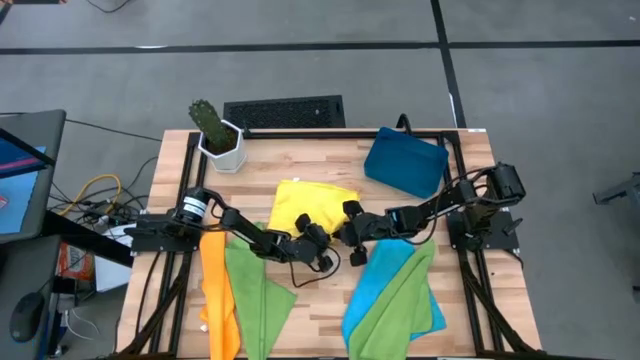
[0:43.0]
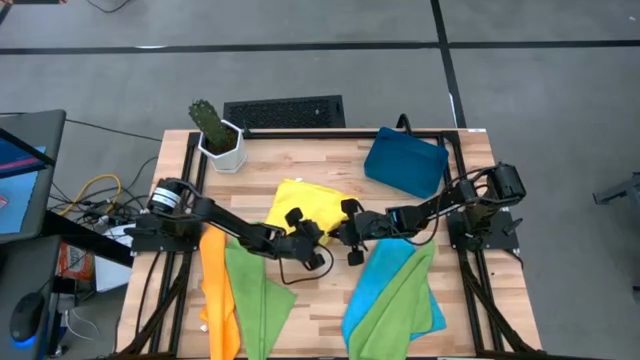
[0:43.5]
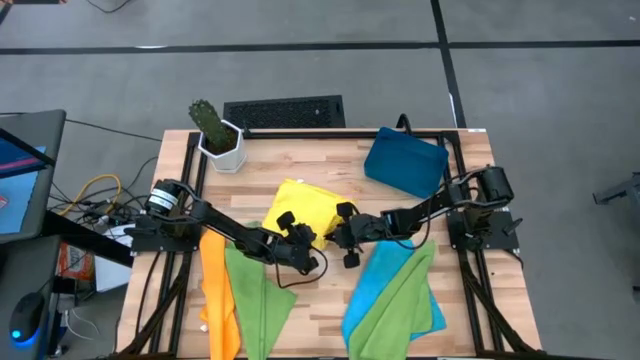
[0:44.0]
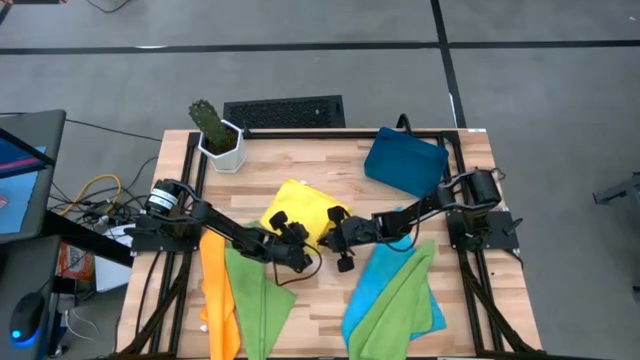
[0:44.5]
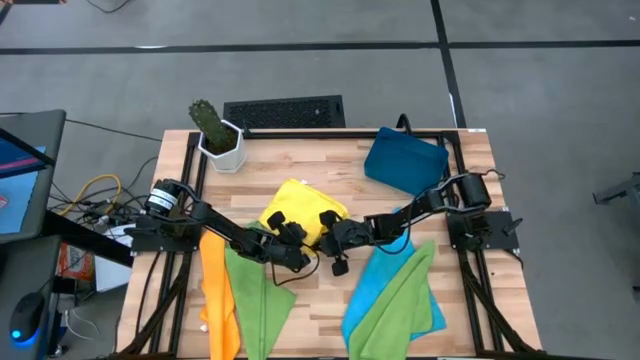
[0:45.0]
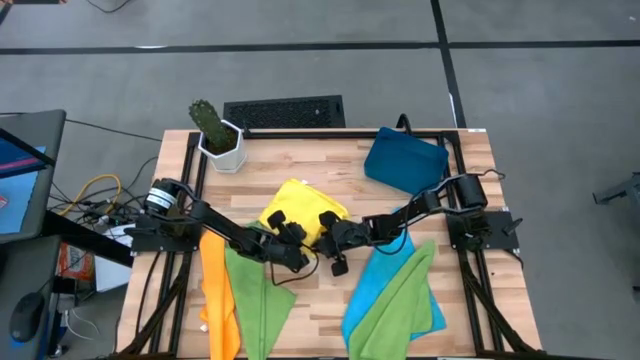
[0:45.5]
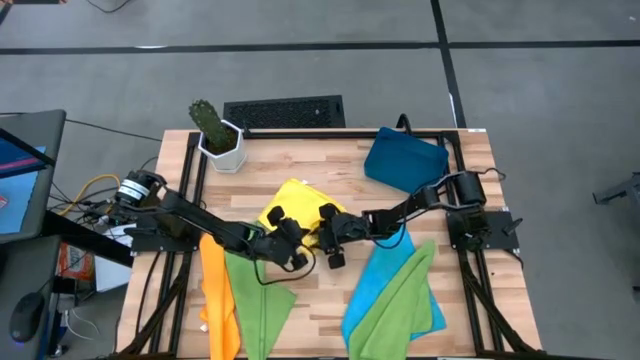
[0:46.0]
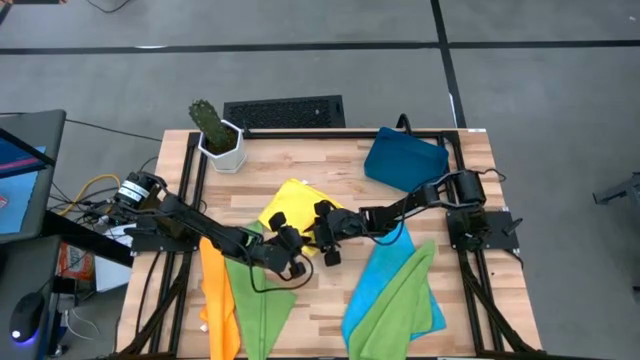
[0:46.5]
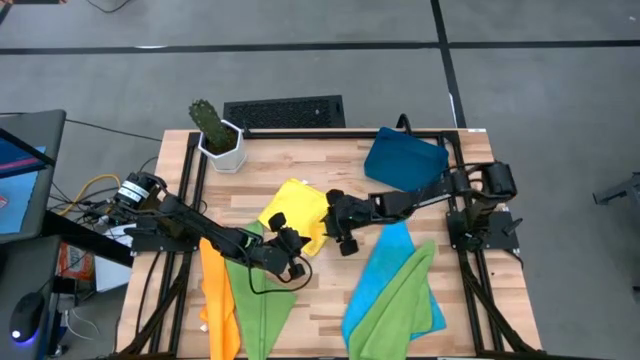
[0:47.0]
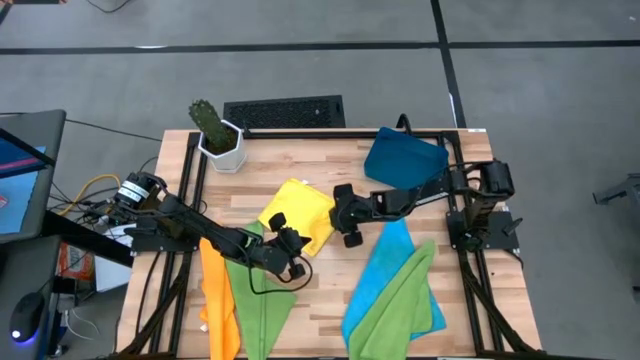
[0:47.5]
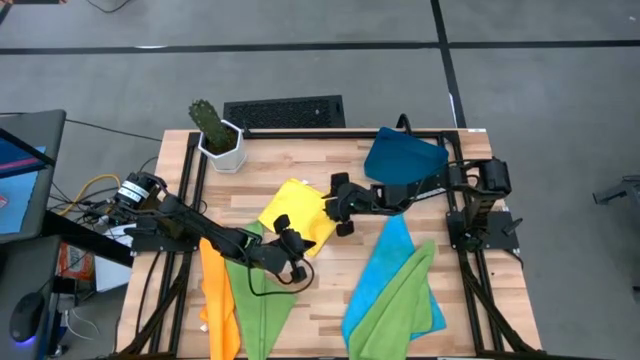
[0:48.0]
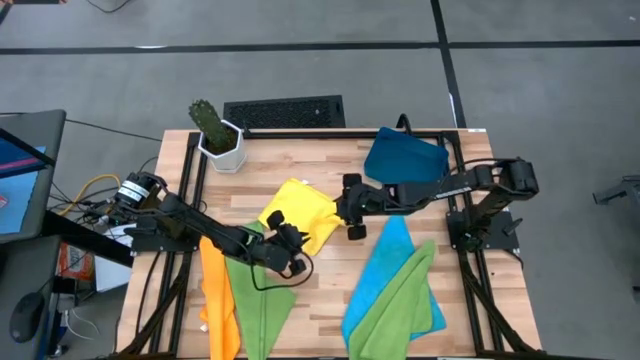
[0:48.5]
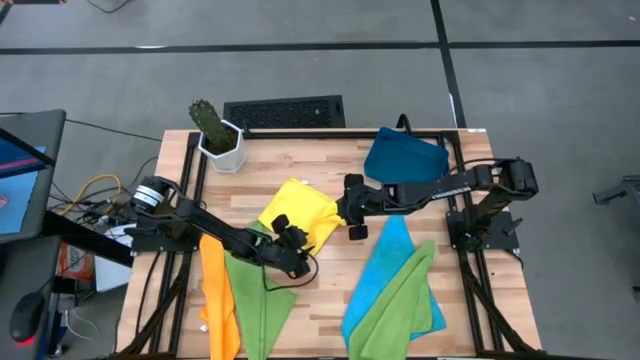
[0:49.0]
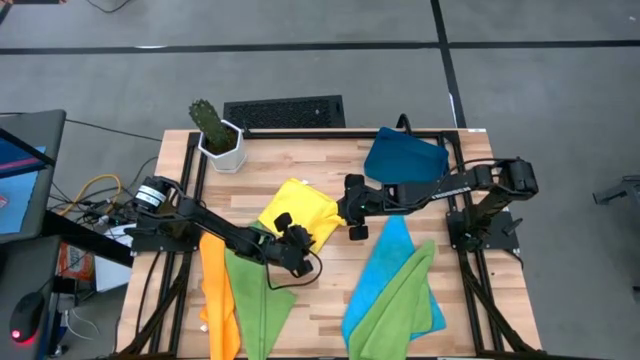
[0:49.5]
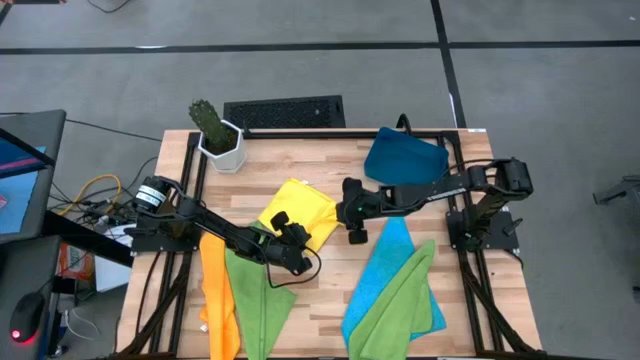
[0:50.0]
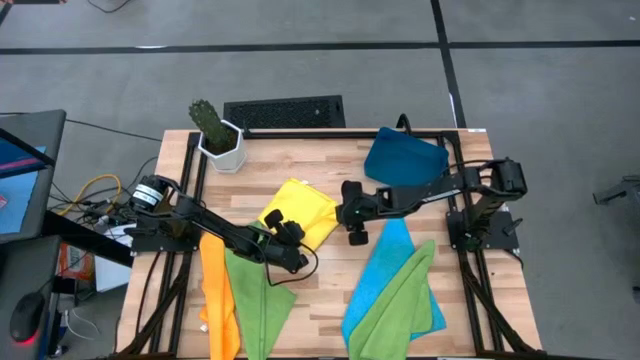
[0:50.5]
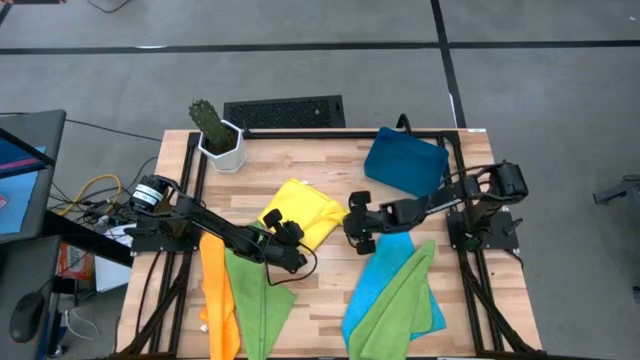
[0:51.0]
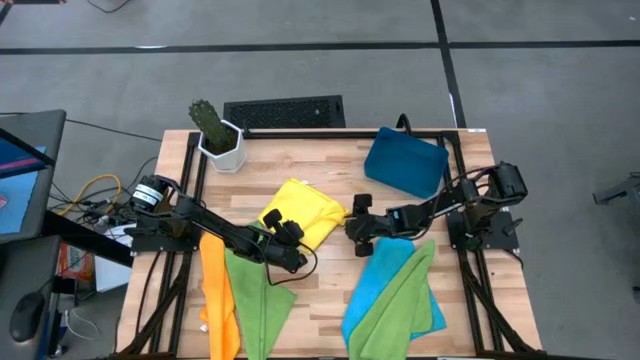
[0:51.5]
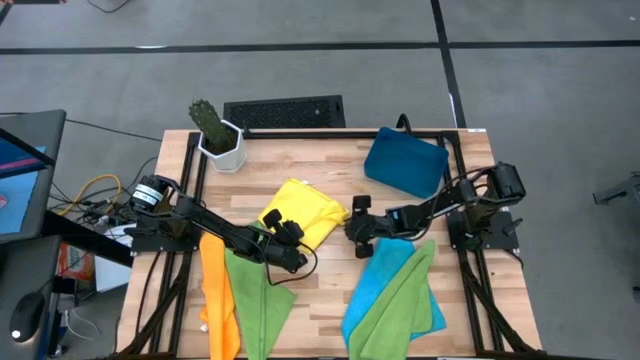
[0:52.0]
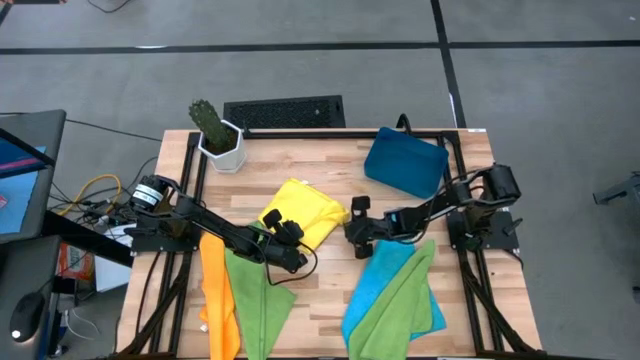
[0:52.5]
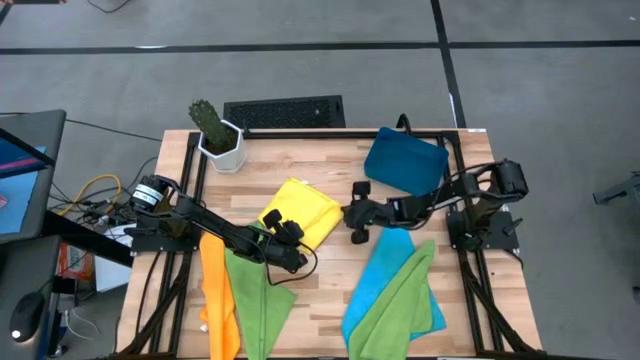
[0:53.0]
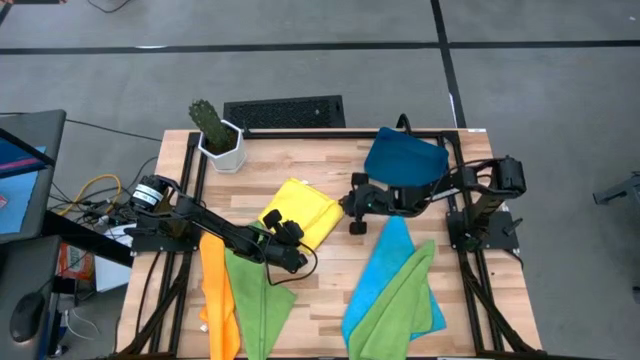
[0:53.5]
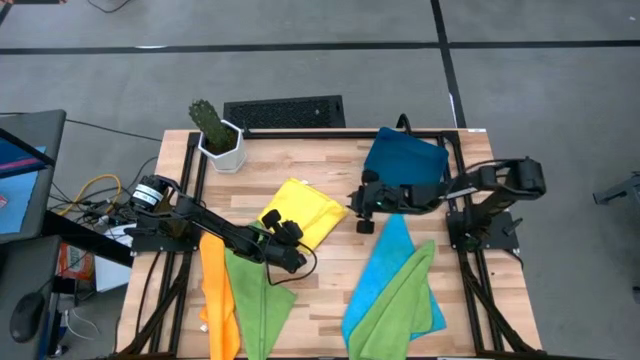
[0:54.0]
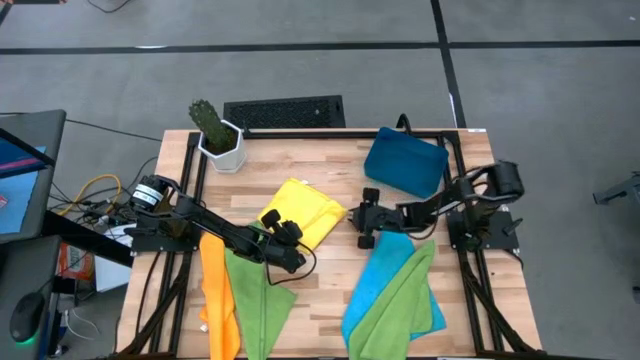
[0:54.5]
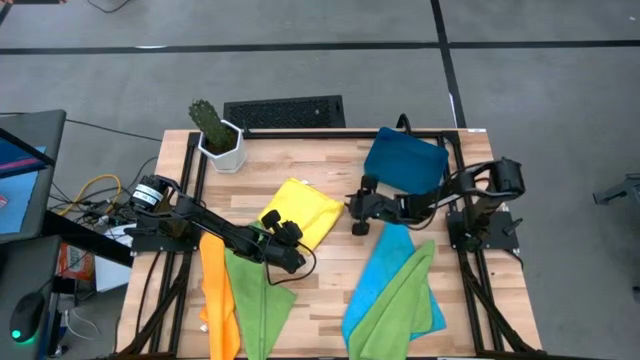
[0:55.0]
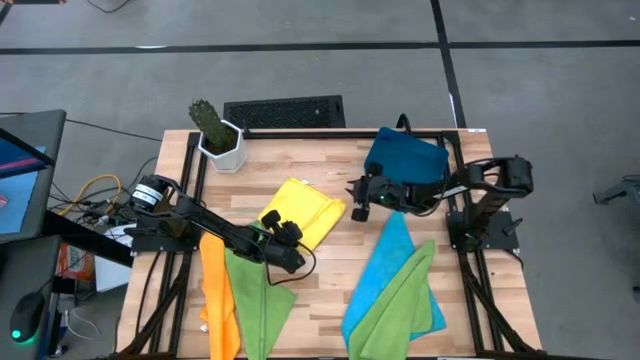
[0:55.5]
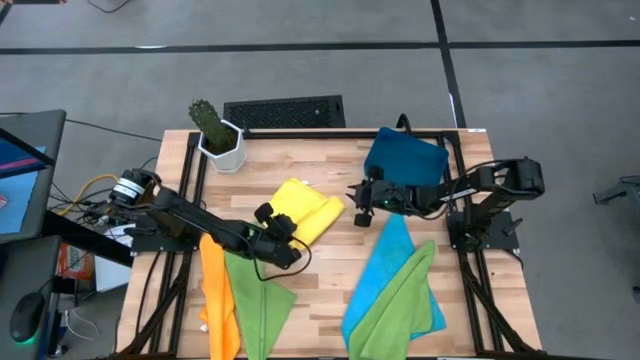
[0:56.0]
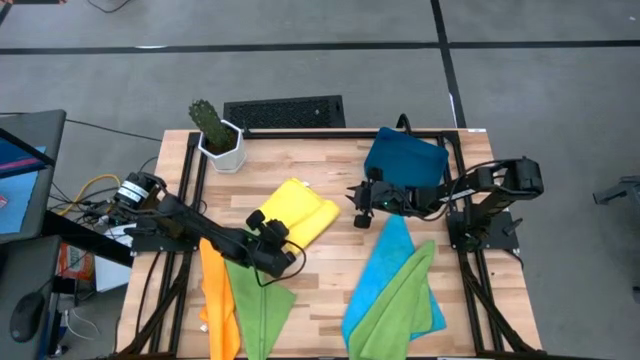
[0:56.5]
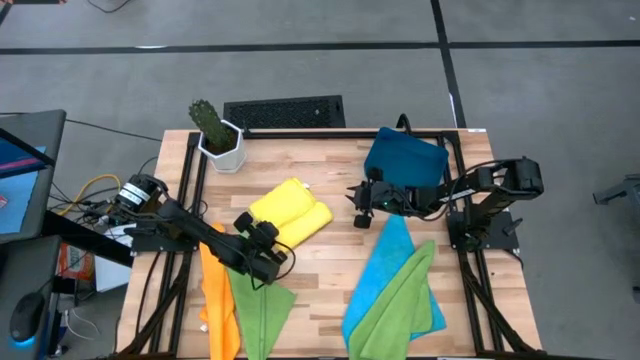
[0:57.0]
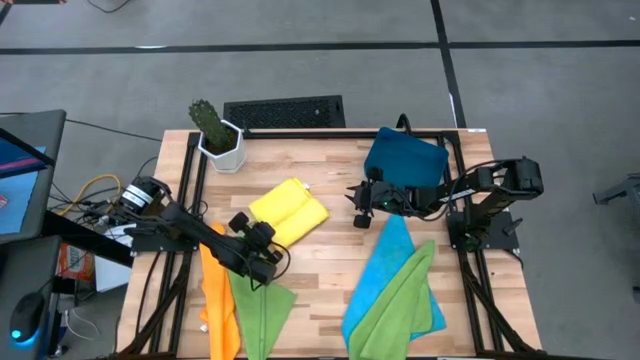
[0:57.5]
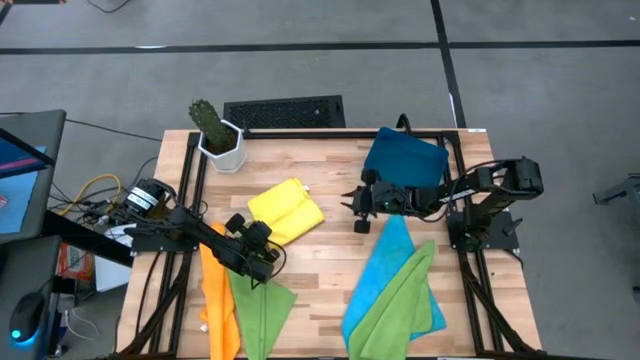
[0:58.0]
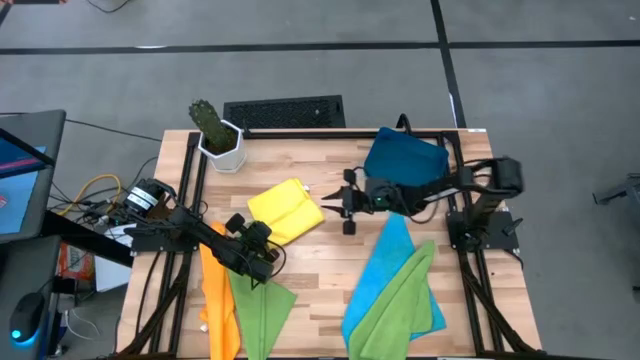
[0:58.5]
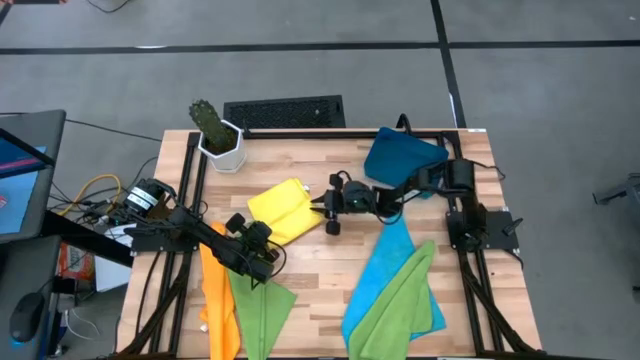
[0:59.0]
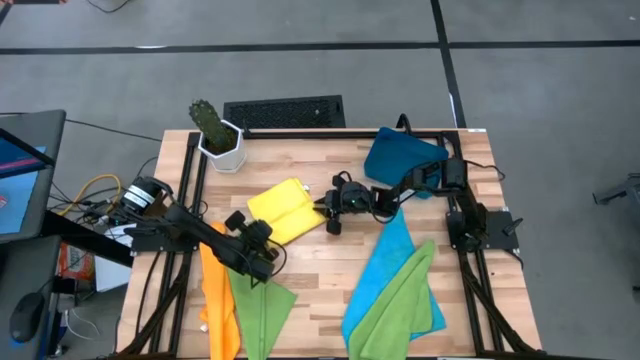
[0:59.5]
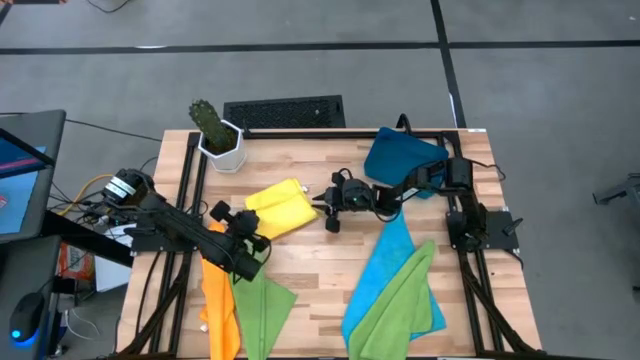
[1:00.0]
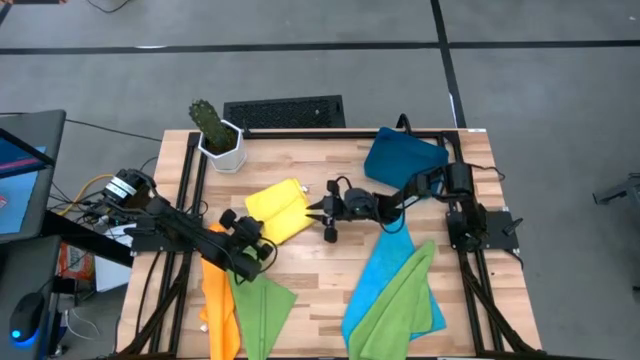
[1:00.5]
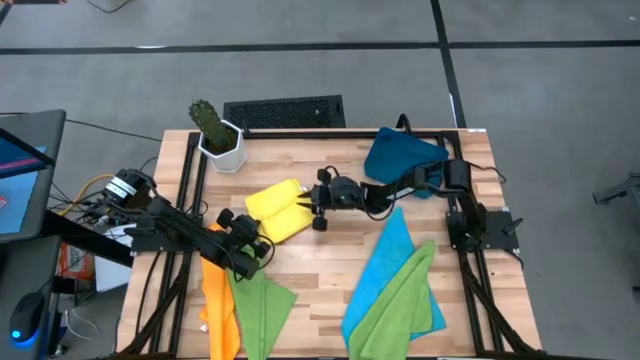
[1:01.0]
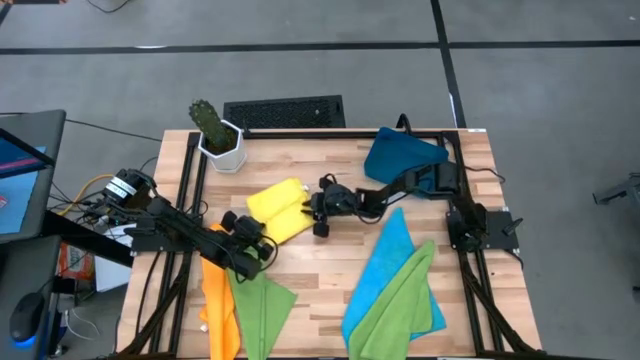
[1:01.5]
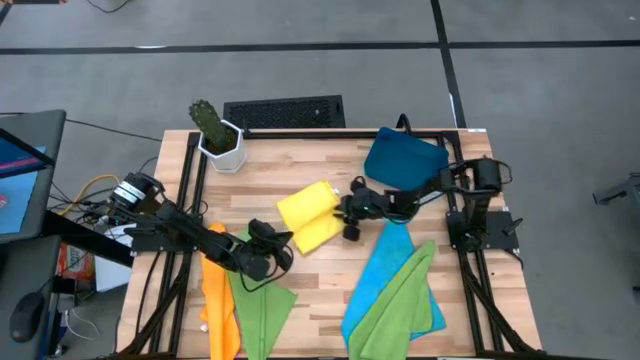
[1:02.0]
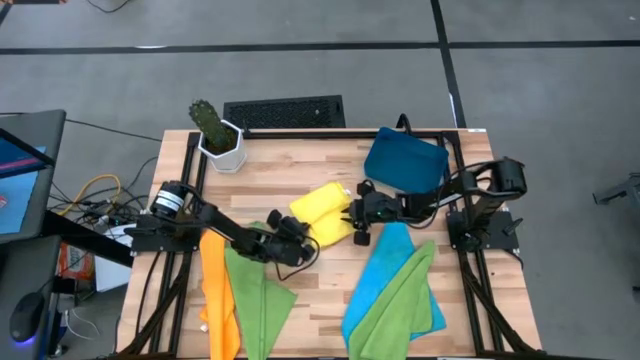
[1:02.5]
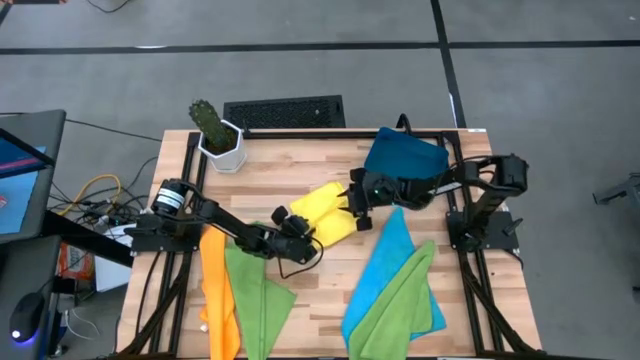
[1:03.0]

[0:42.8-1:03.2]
Task: Fold microfiber towels
Fold the yellow microfiber cloth
